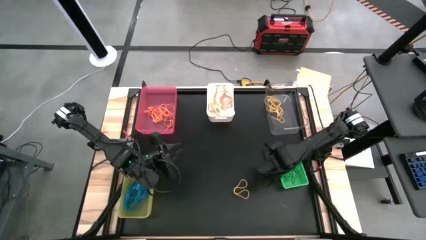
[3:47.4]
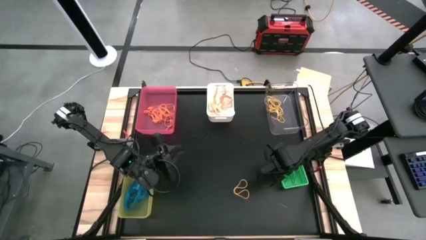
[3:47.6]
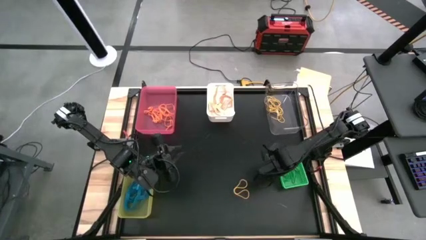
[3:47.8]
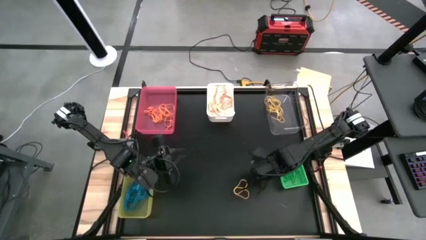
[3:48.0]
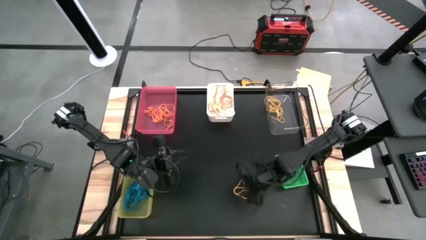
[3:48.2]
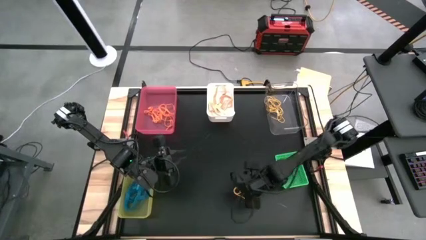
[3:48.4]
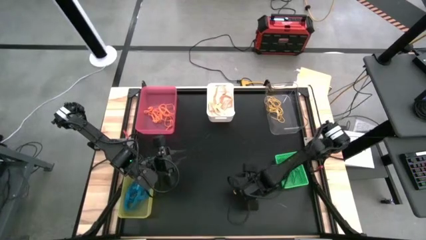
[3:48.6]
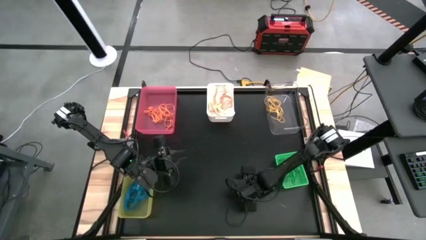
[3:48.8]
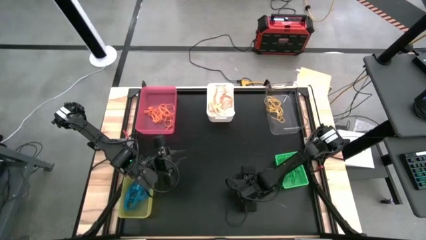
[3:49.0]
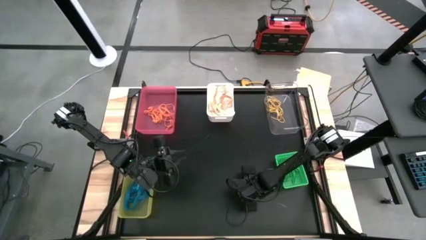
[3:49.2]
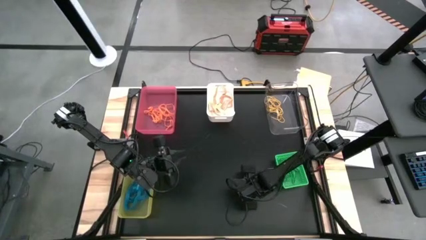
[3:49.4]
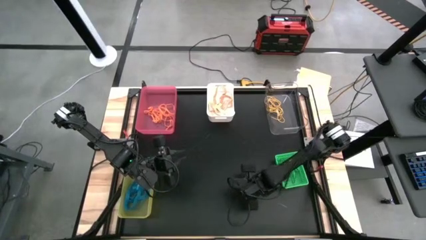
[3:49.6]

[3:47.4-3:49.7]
Task: Sort rubber bands into baskets
Put the yellow rubber band into the transparent bin

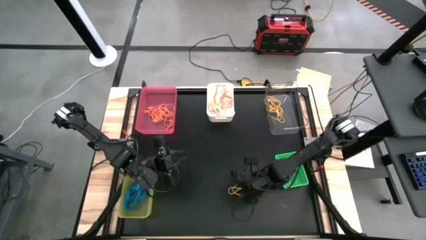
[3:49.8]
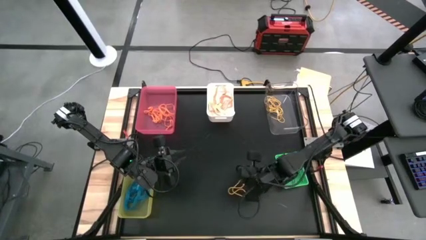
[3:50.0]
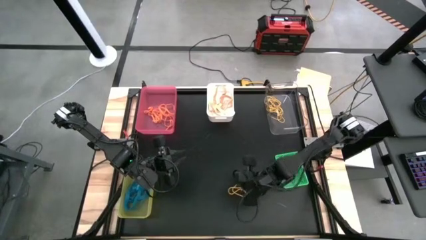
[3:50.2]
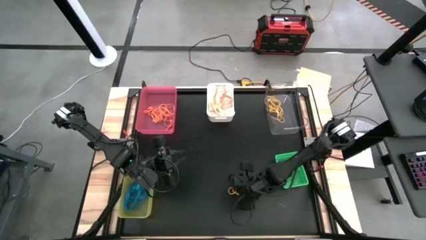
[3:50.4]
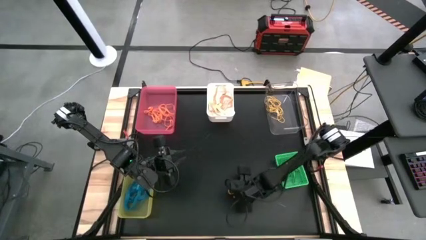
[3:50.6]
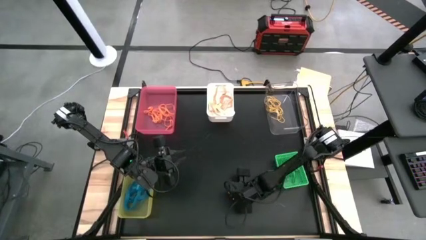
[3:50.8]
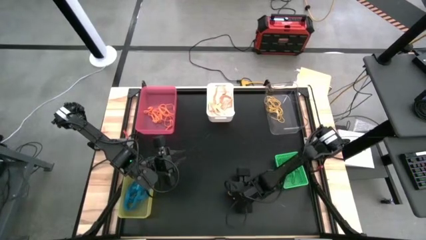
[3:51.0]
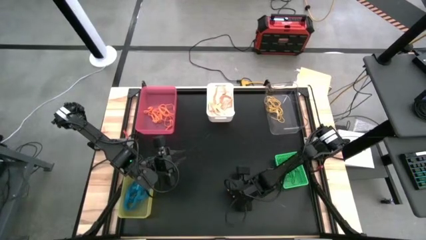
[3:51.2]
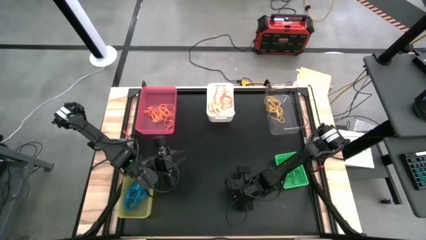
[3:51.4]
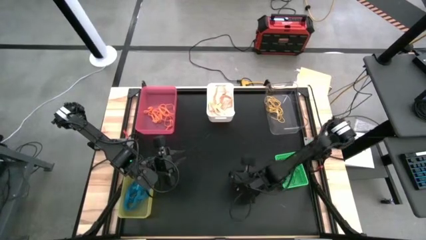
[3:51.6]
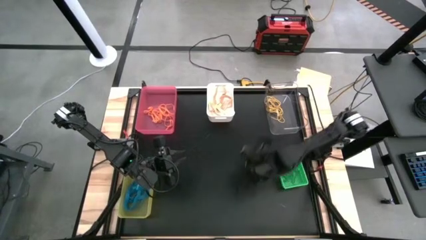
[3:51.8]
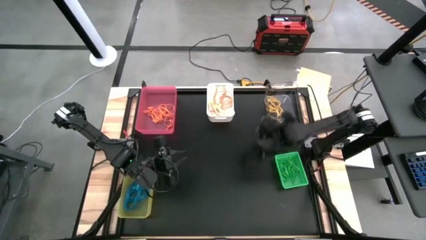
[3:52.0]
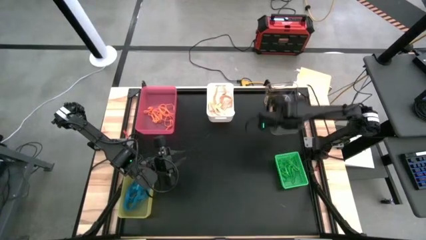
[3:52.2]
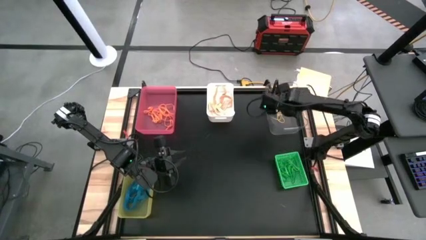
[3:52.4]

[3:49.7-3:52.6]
Put the yellow rubber band into the transparent bin

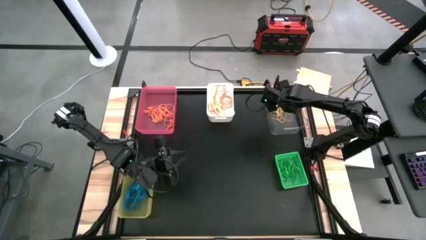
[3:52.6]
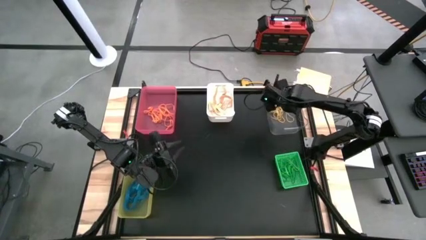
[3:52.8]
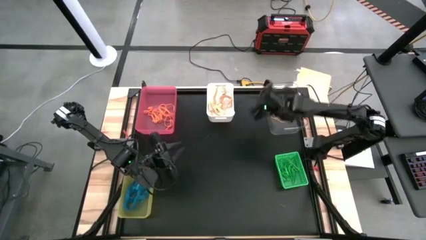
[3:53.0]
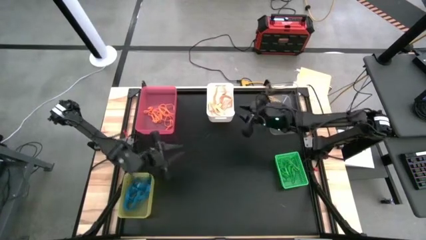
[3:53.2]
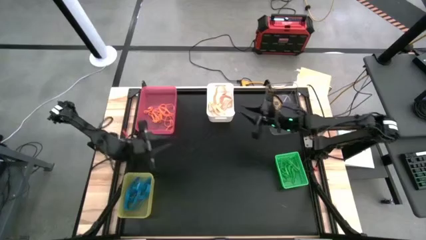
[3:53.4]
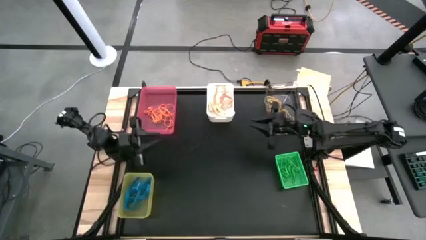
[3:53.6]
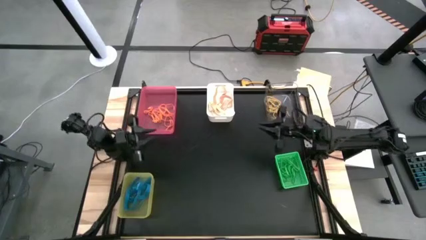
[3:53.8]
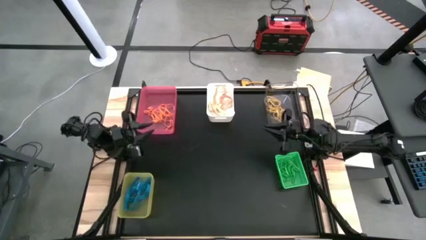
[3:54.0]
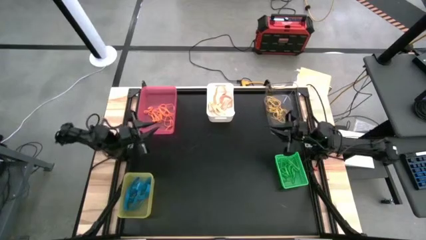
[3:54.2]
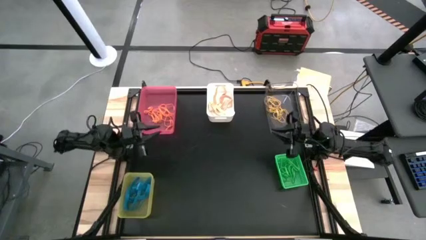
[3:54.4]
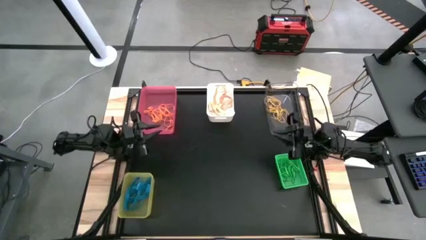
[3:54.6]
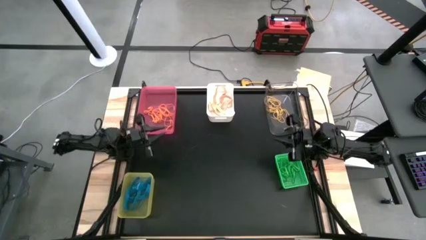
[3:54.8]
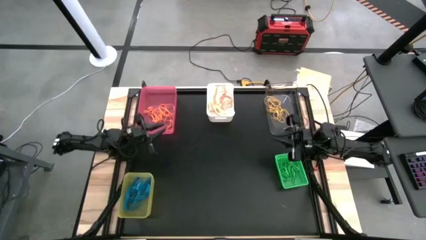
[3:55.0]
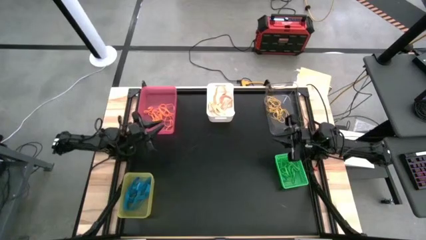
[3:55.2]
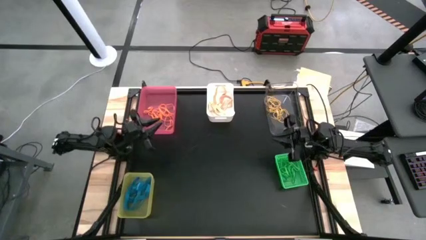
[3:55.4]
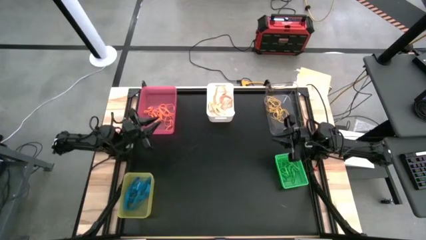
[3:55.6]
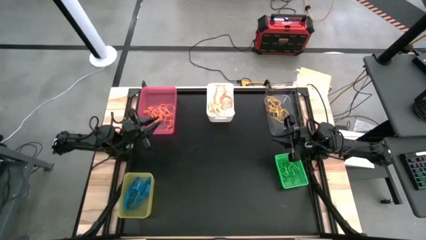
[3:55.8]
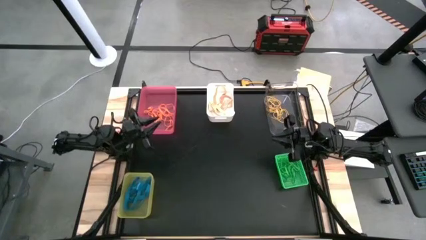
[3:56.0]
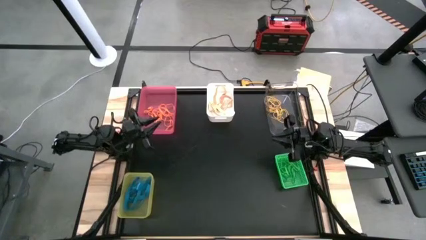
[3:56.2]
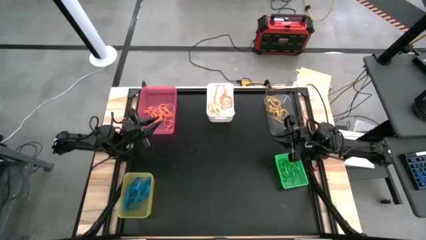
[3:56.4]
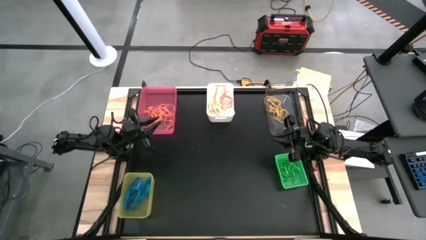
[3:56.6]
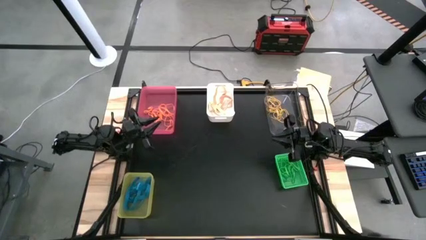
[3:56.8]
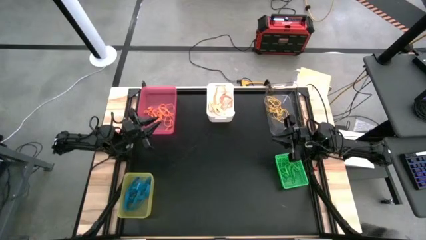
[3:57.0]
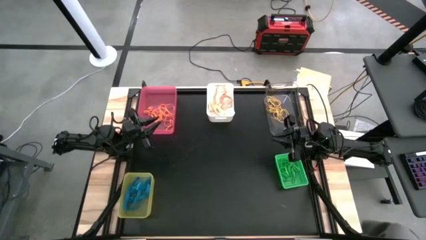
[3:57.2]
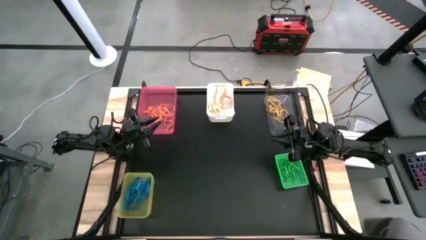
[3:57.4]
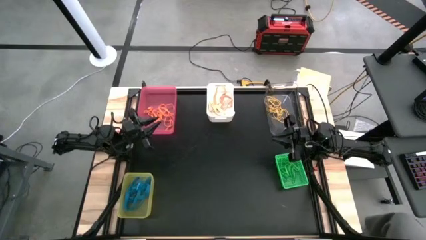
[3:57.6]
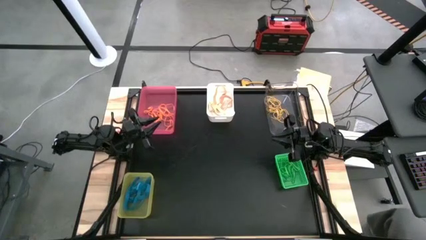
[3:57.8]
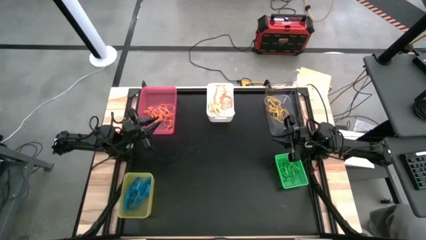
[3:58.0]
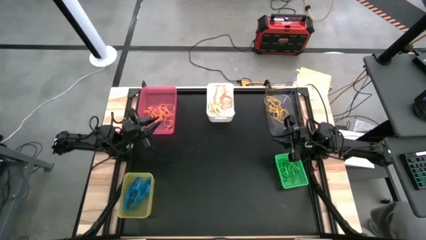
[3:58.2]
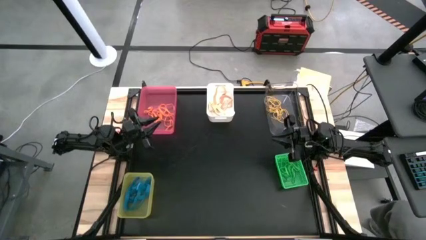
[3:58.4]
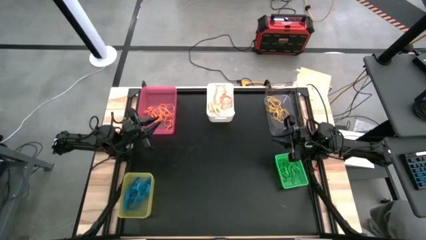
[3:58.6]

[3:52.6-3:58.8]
Return to Home Position
